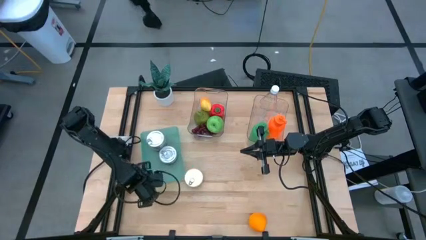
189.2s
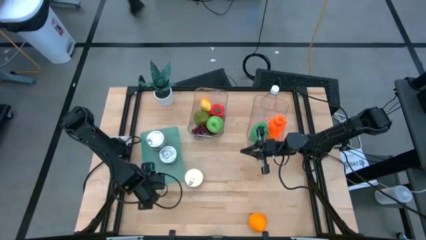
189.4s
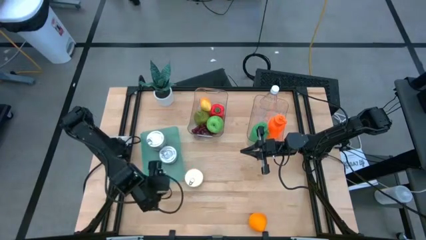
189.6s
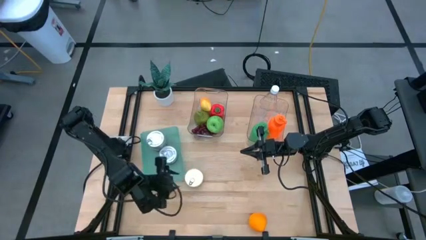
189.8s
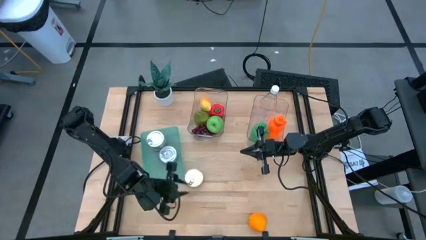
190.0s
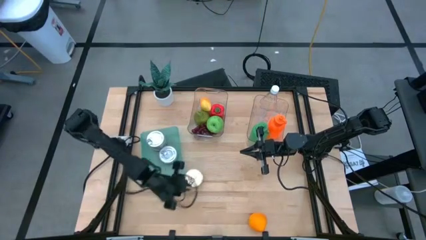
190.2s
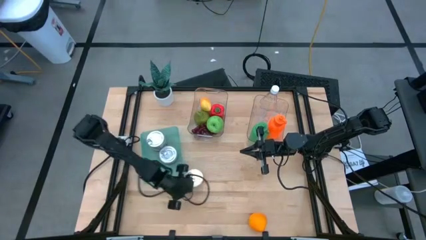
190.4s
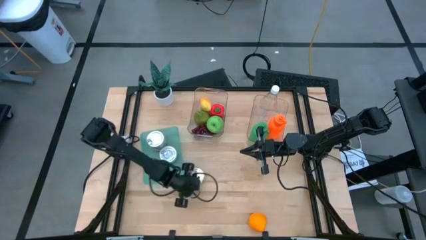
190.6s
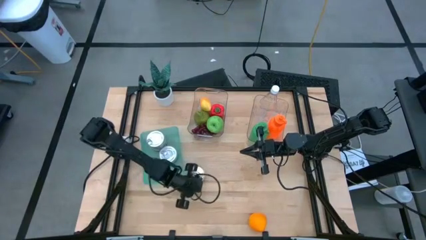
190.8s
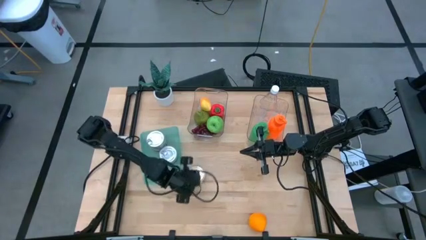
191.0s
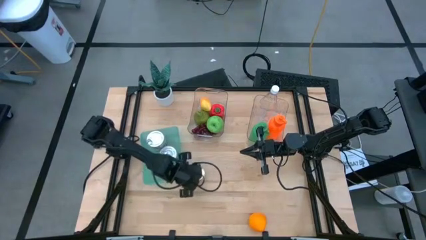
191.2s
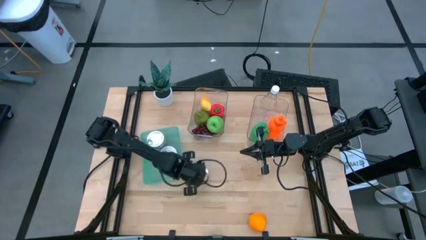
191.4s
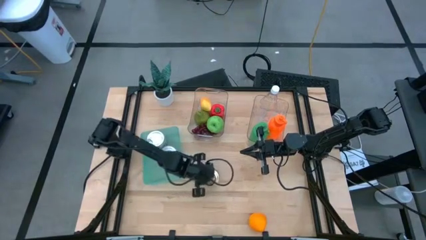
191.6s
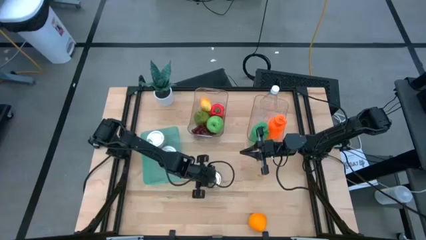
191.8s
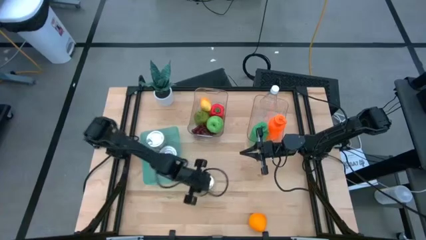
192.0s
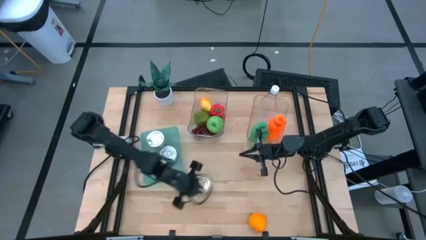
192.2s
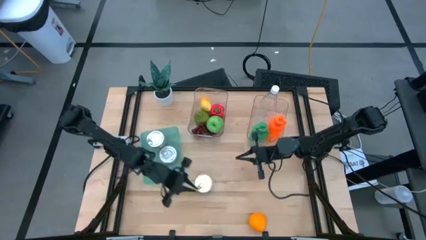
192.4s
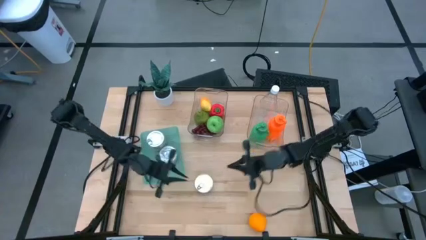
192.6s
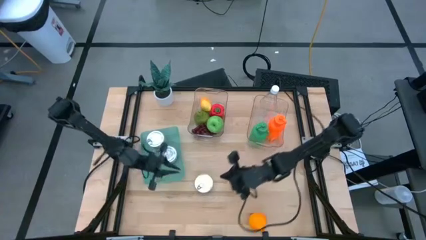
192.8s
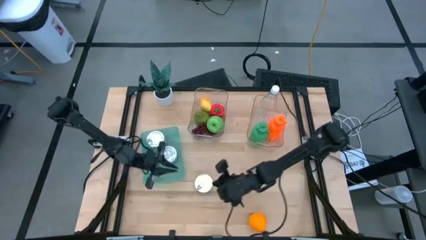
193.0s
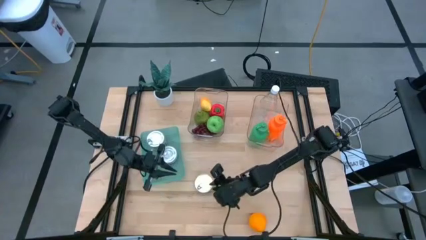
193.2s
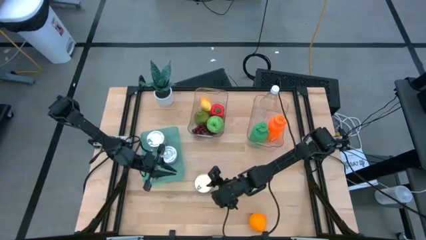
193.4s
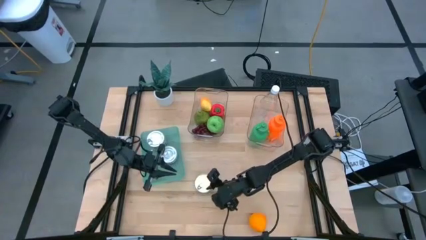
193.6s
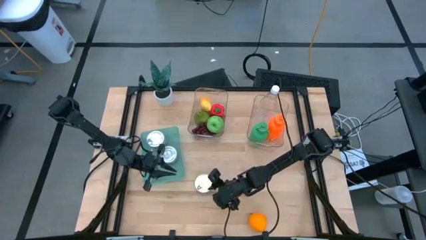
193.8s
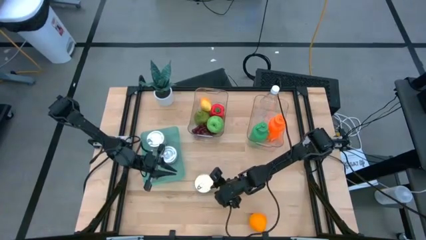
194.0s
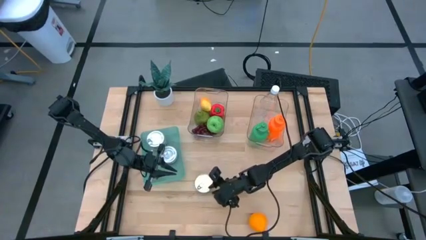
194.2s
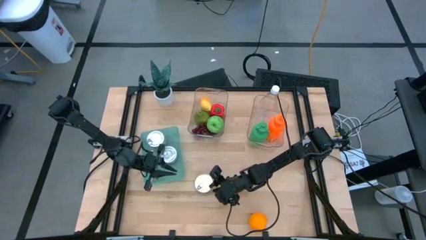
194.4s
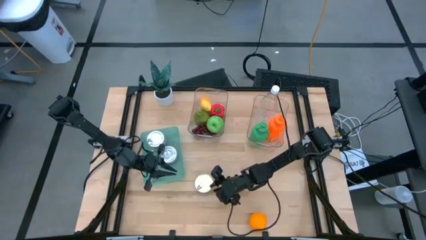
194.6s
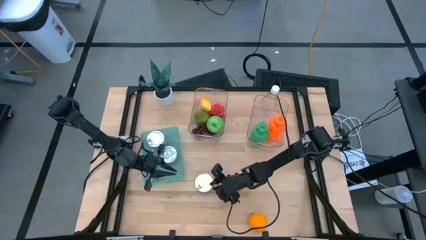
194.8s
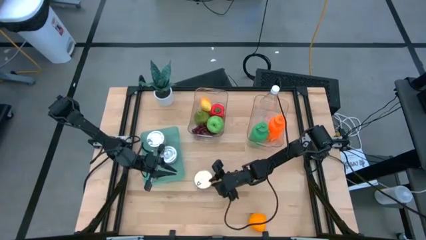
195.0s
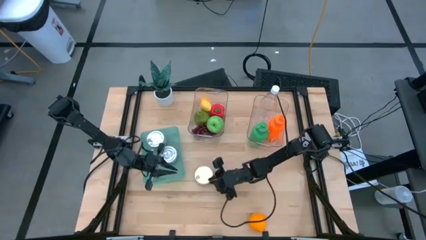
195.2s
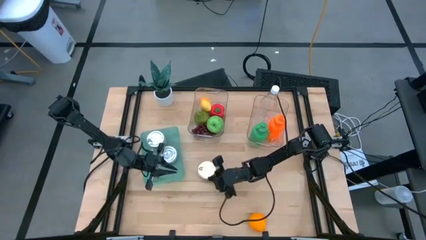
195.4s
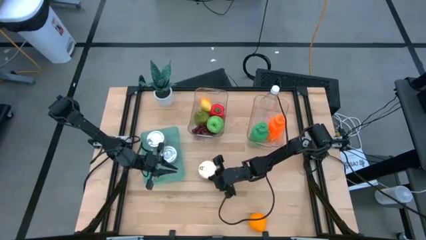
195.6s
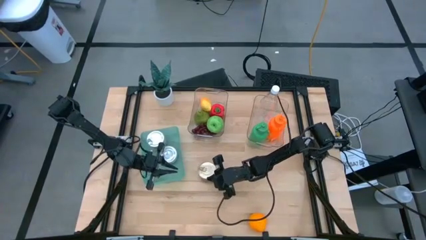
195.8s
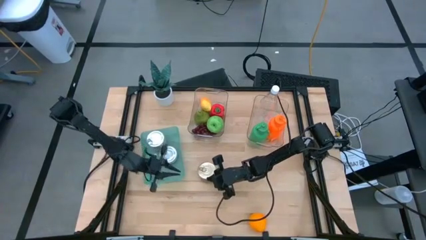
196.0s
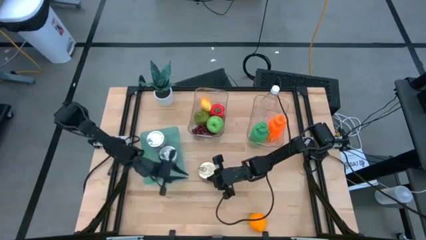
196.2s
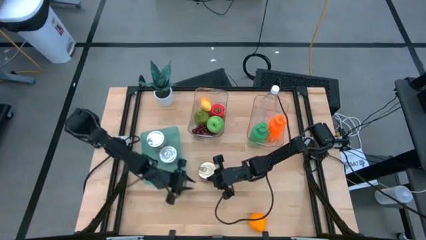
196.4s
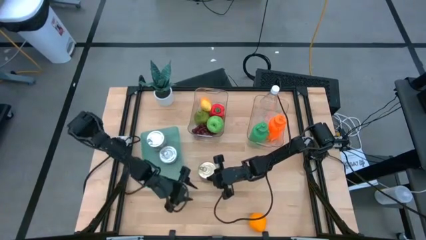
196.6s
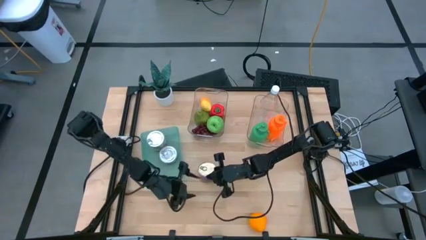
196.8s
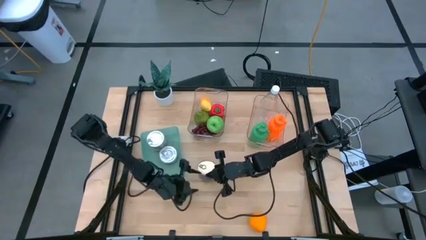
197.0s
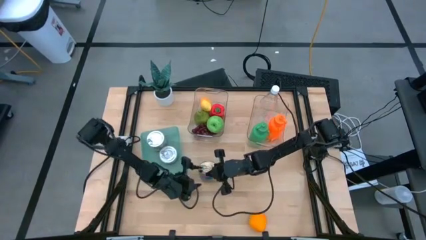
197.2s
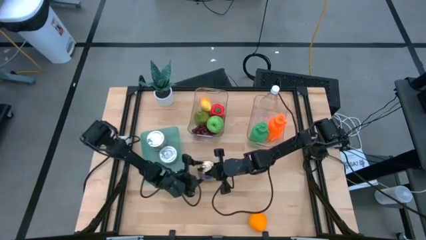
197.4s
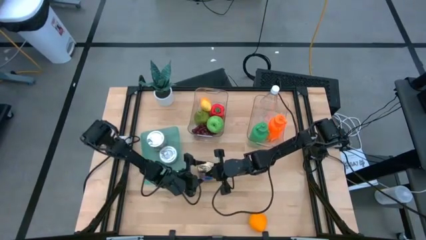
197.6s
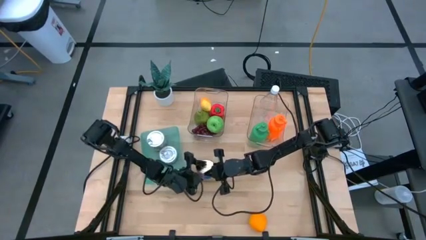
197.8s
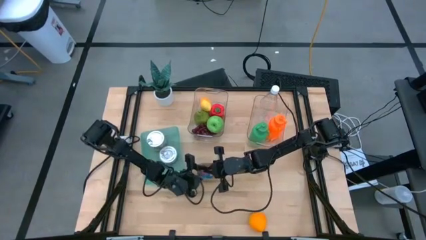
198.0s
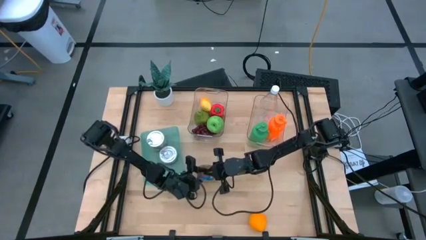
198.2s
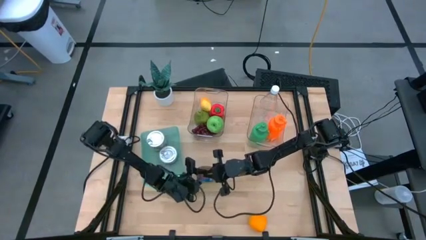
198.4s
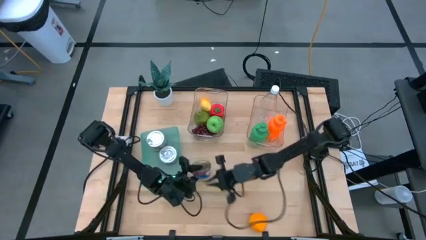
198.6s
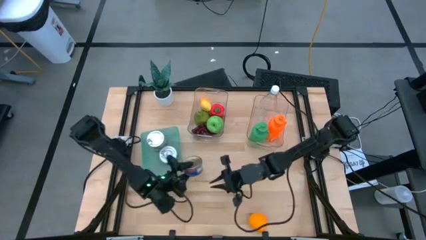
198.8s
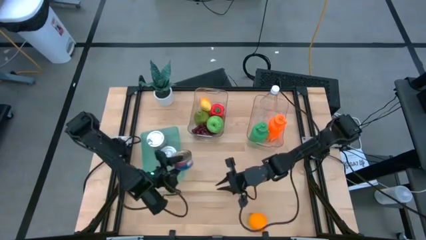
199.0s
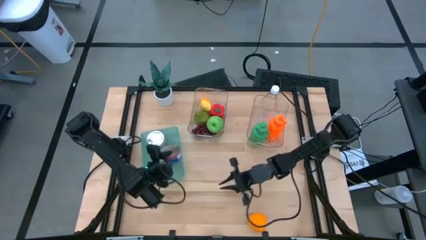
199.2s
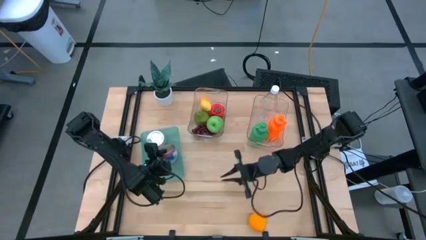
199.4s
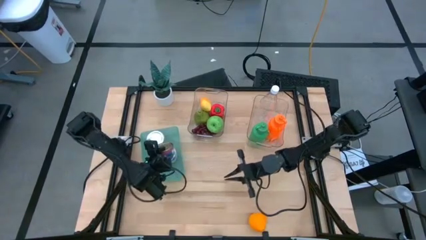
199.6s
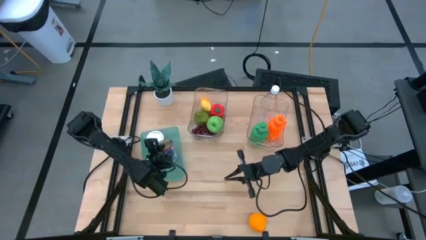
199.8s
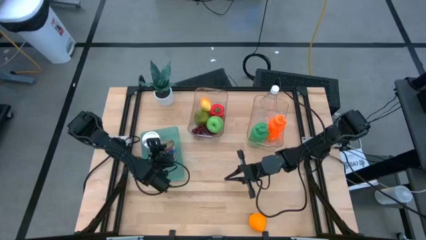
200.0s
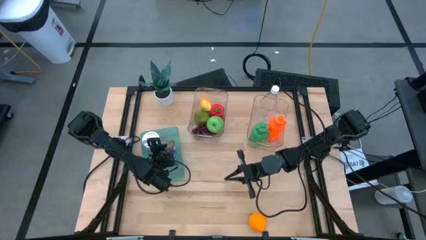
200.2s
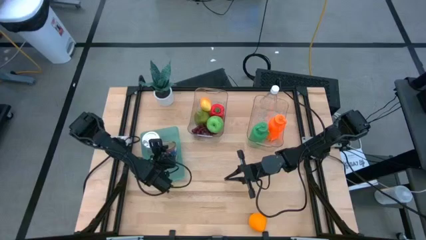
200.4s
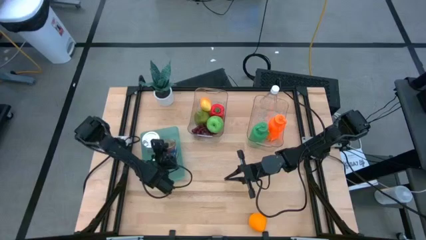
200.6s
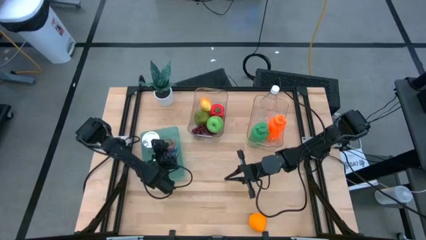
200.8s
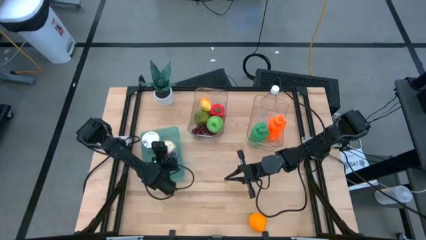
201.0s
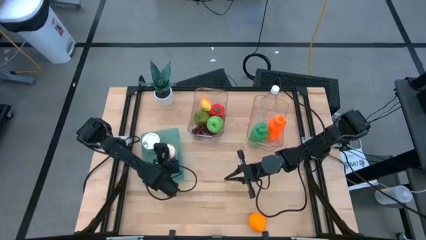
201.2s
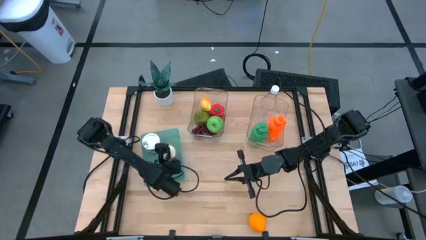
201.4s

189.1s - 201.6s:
Task: Pick & Place Food Item
Put the blue and pink tuna can into the green bin
